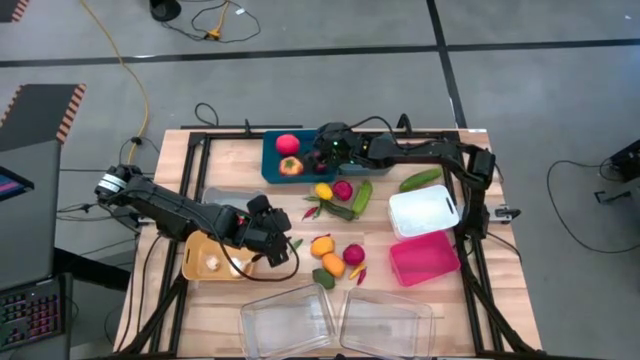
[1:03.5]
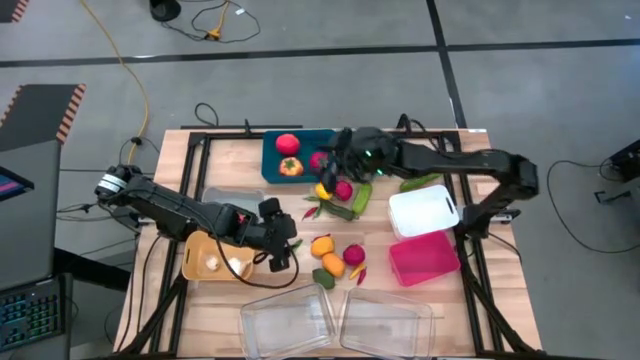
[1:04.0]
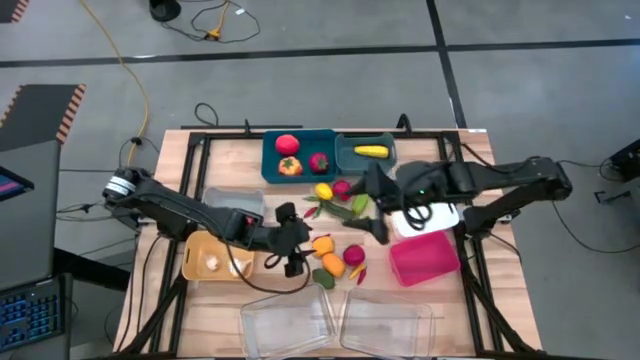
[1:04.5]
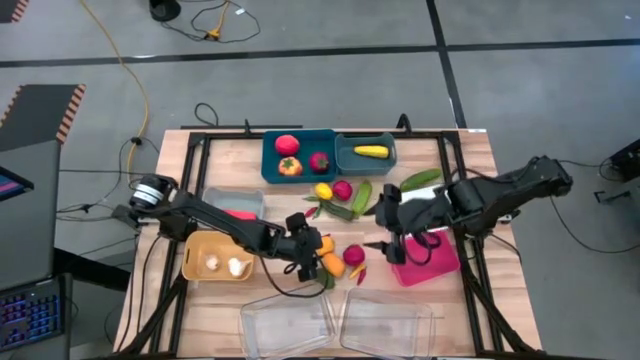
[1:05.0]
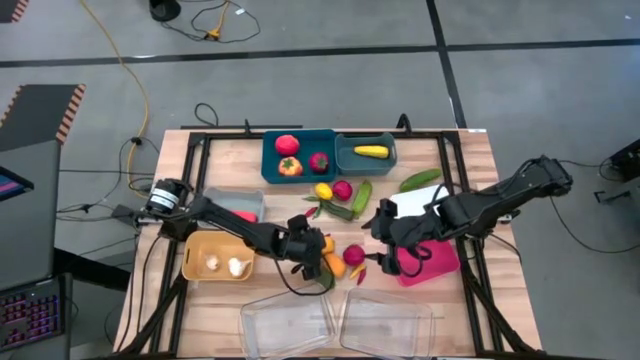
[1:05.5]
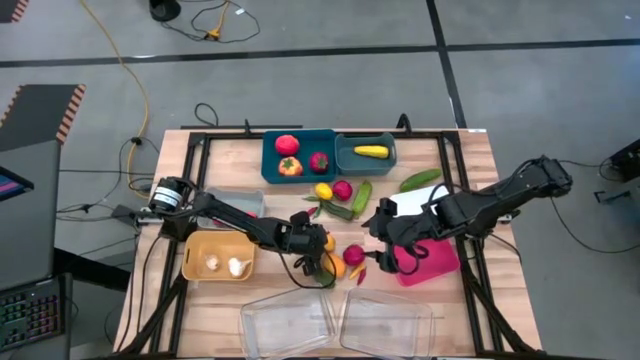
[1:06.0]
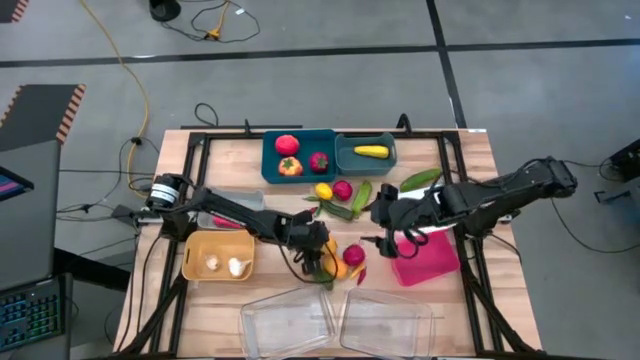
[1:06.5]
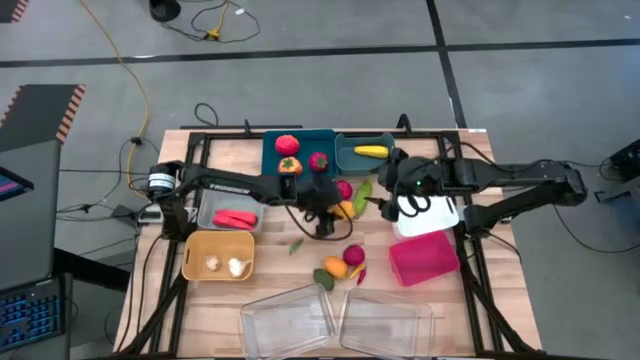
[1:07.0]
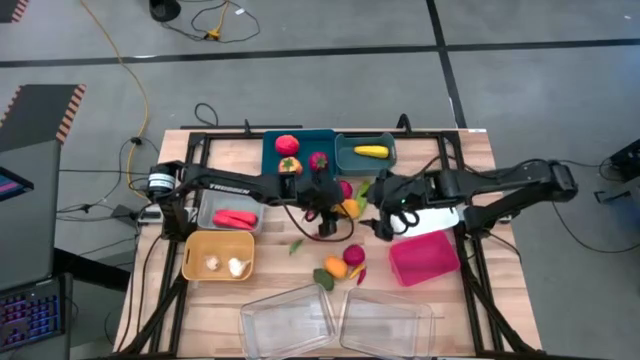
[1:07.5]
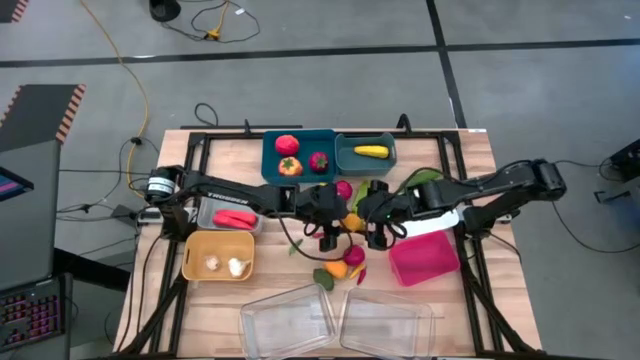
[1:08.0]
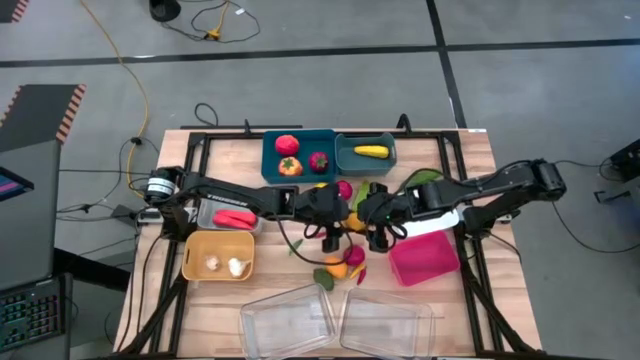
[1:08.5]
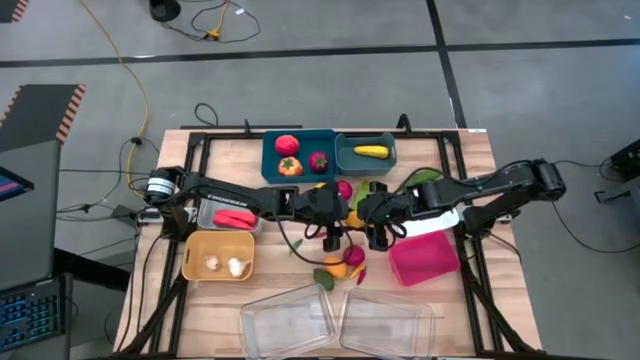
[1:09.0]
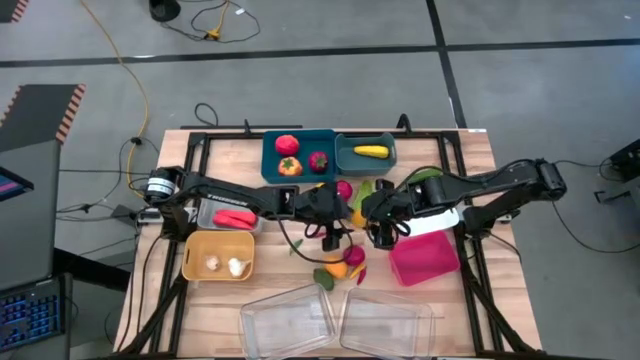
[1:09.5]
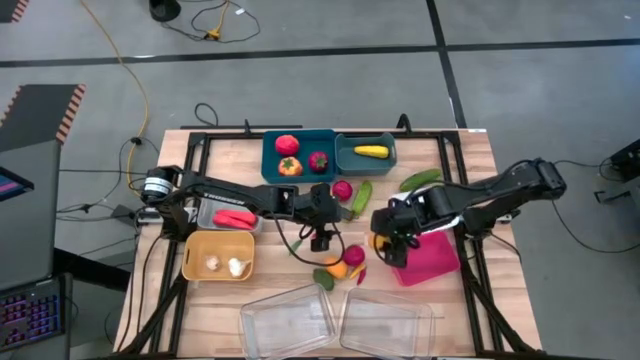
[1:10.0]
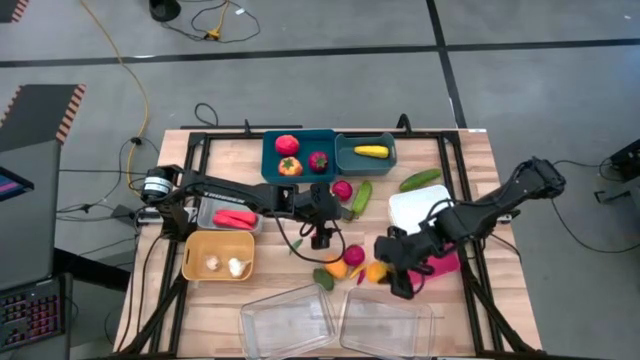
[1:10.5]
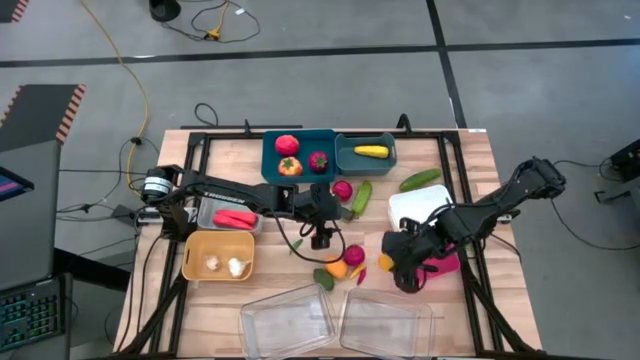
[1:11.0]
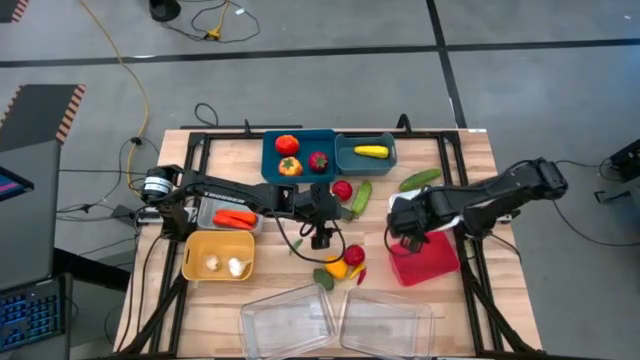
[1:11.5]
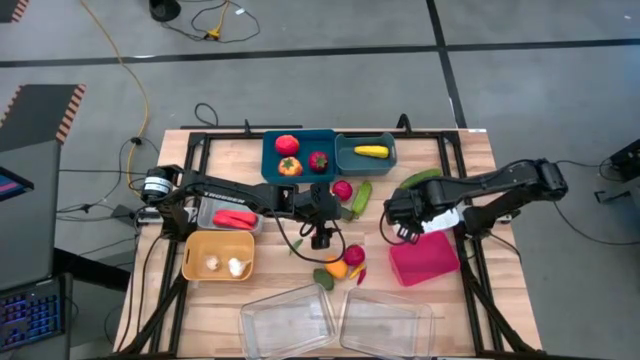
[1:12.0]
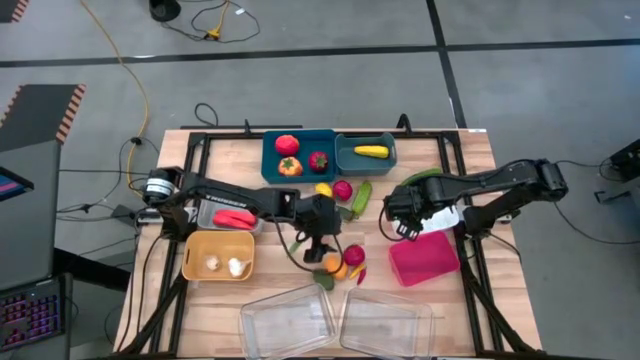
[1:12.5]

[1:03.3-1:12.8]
Task: Sort produce into baskets
Put the lemon into the white bin

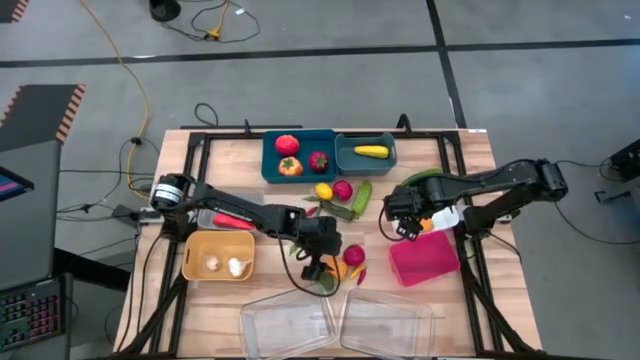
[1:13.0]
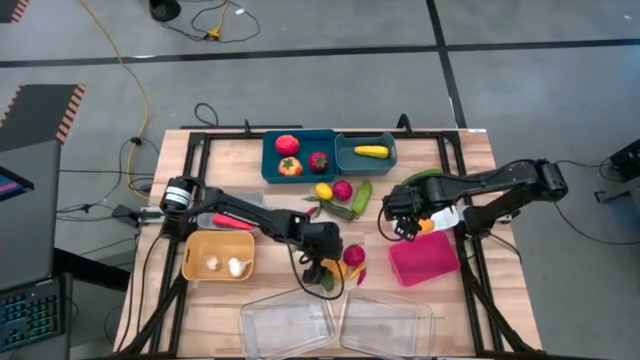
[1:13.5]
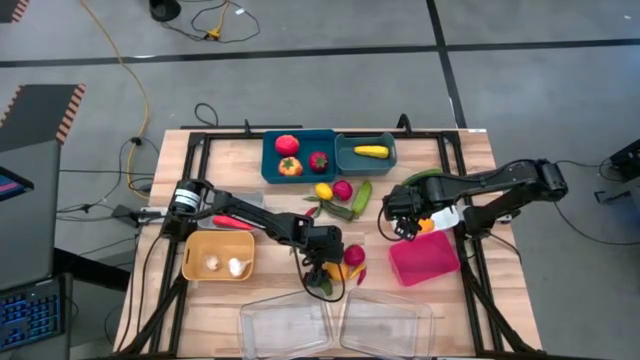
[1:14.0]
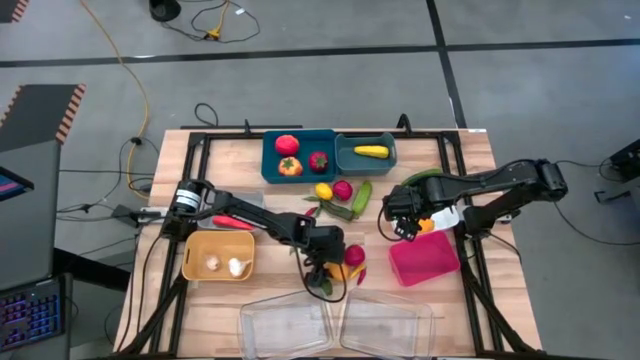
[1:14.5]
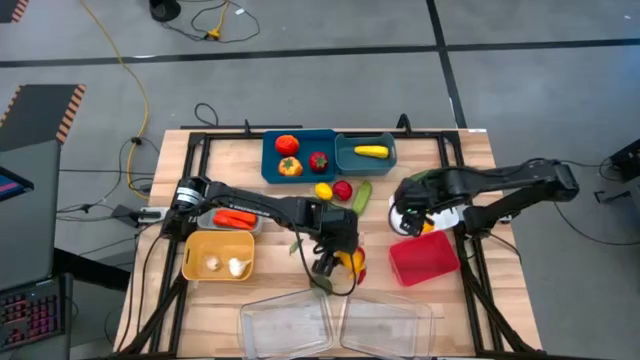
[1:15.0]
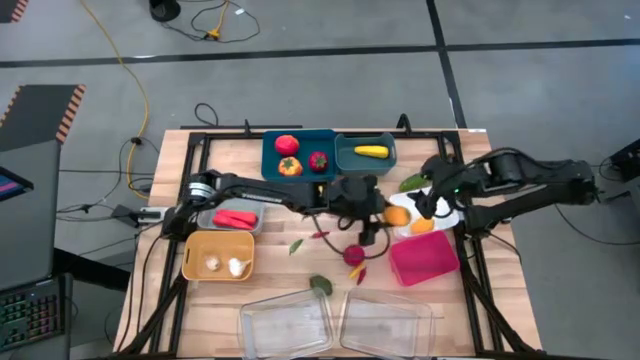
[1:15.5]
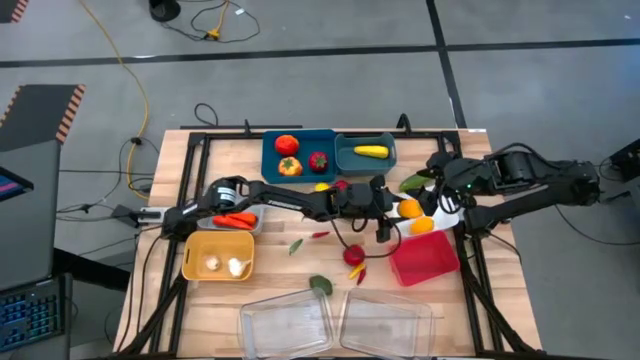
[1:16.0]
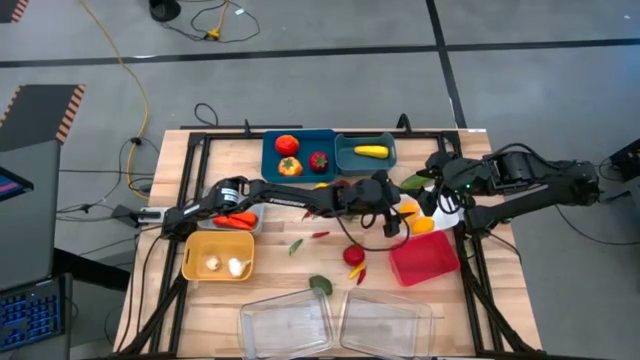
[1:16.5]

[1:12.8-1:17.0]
Put the lemon into the white bin

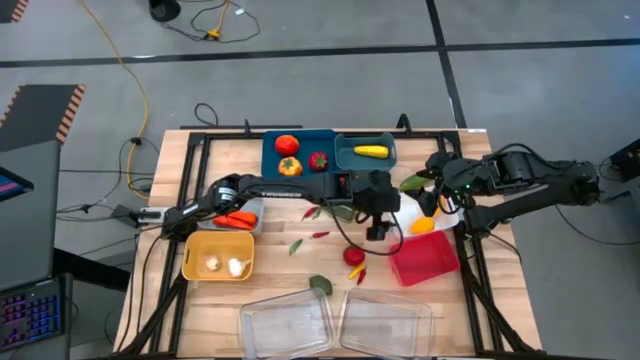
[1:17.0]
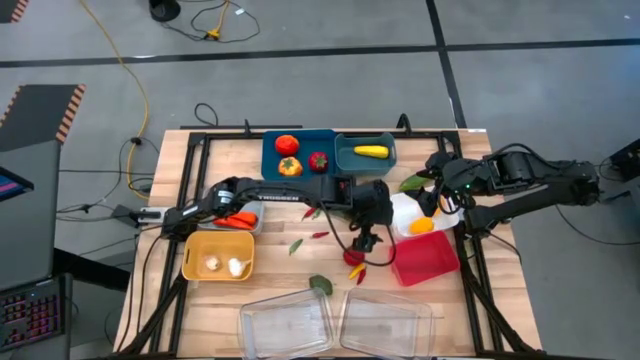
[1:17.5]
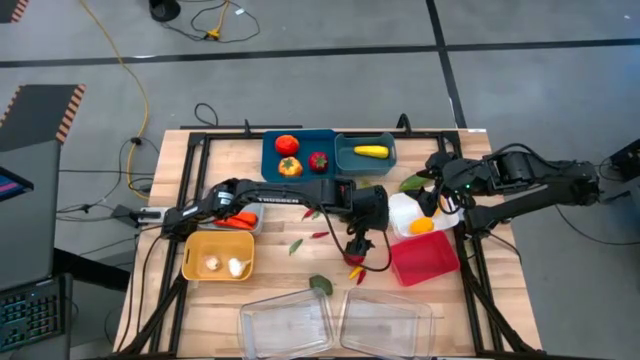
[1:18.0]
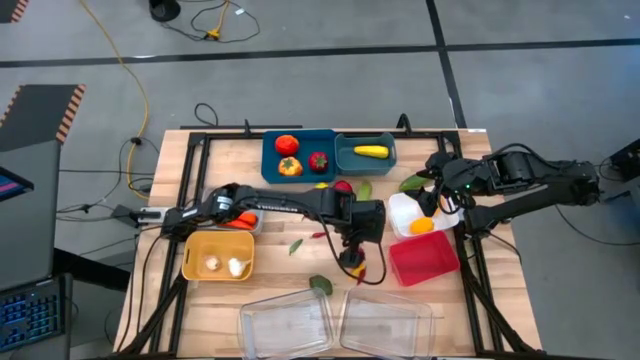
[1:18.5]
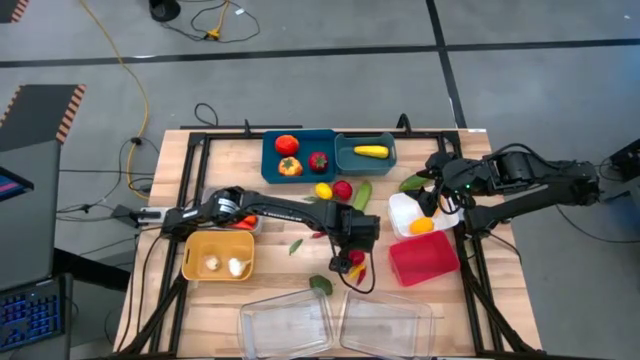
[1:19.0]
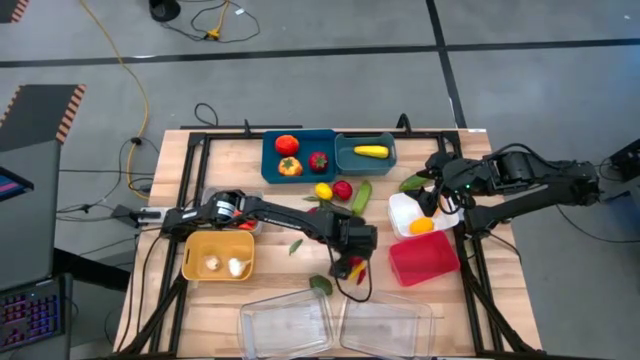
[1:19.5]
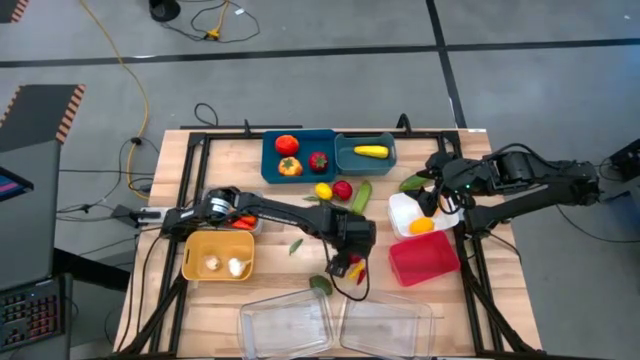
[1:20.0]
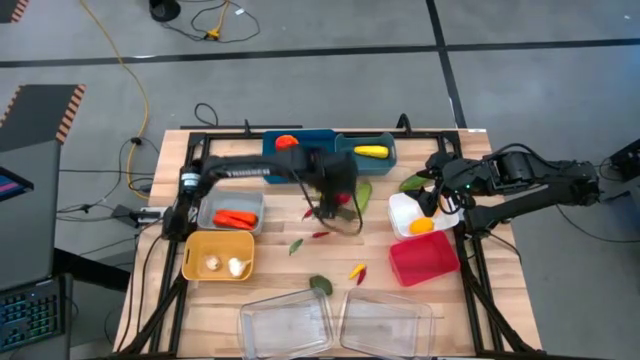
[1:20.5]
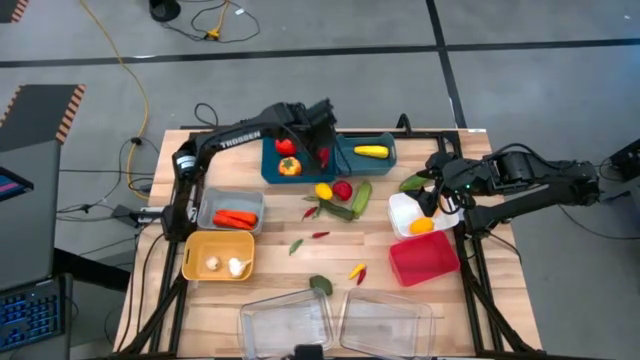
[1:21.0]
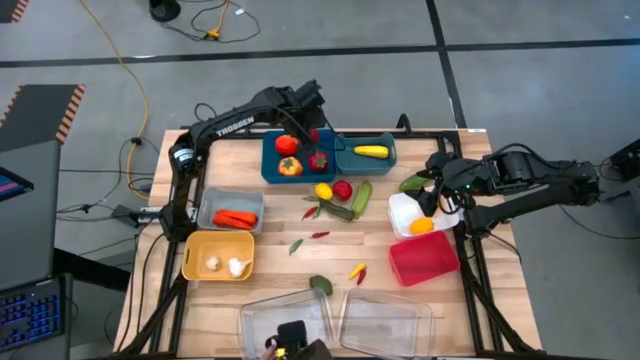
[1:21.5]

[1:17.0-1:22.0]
Put the tomato into the blue bin

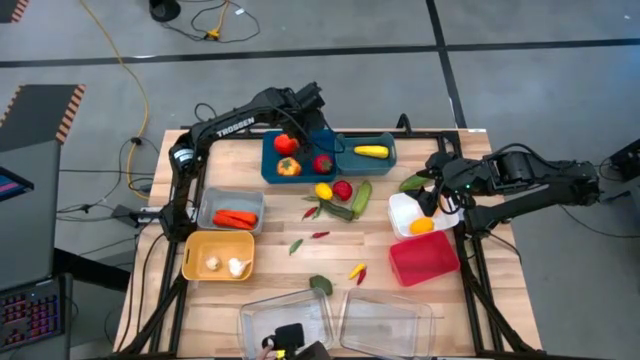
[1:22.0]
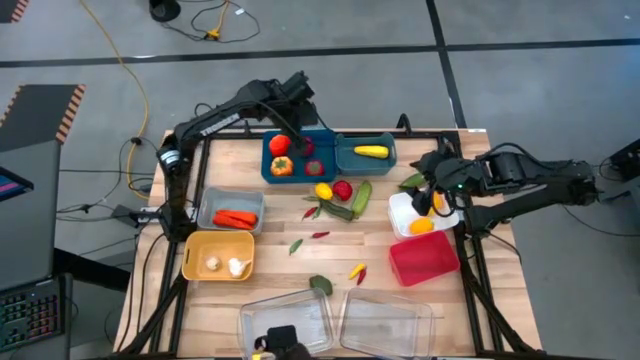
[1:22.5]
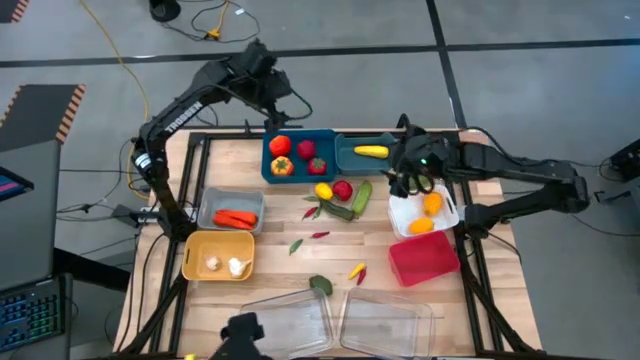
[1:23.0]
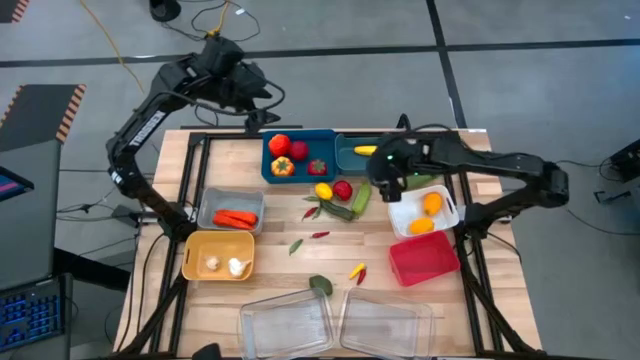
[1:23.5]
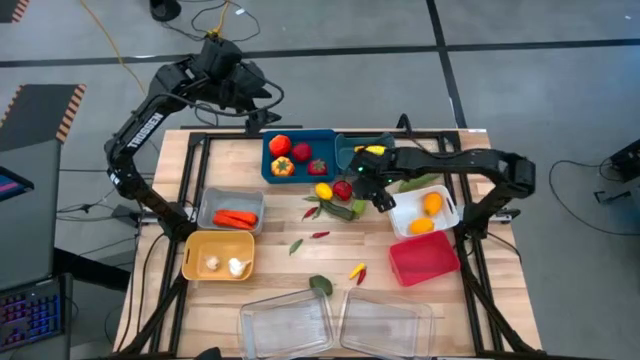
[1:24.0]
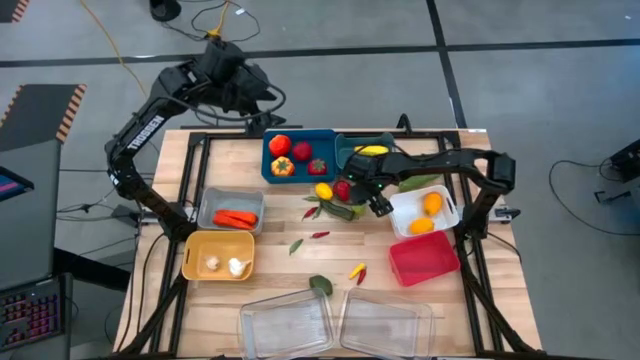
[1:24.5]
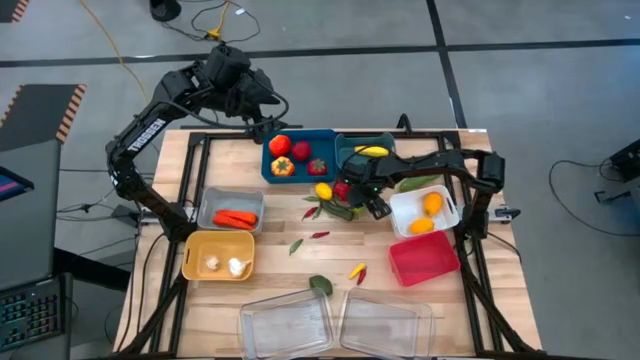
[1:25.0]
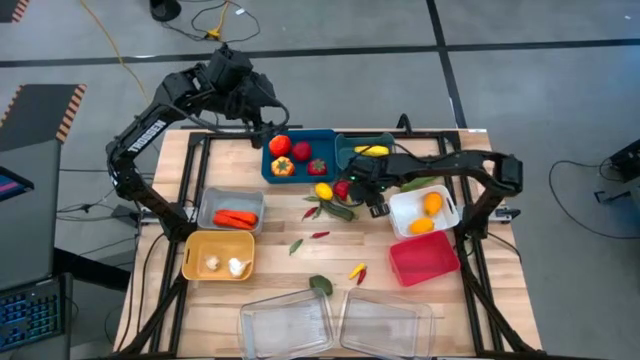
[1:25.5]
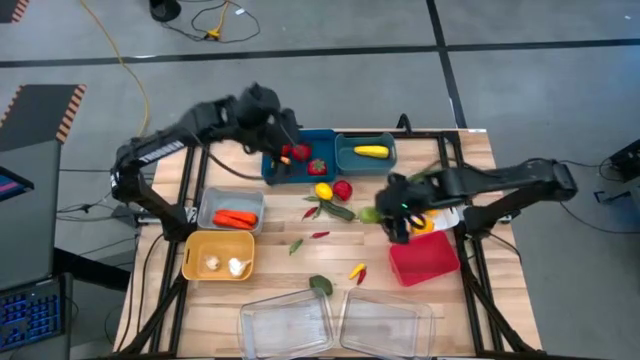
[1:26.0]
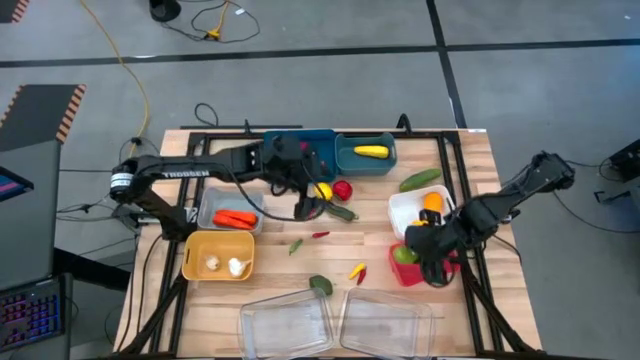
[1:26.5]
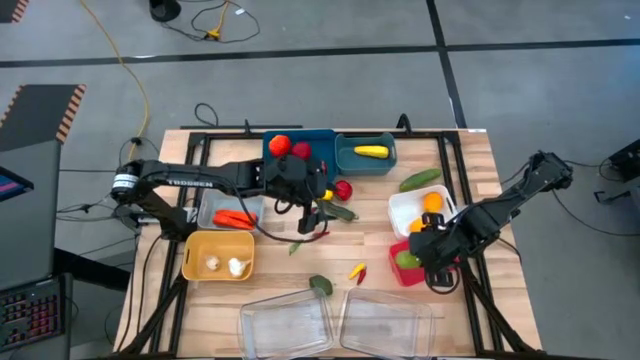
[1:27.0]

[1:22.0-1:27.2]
Put the chayote into the pink bin
